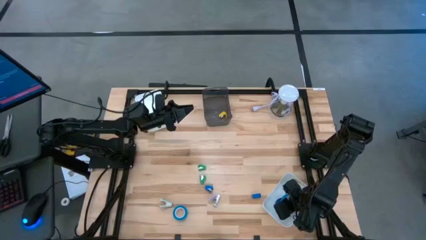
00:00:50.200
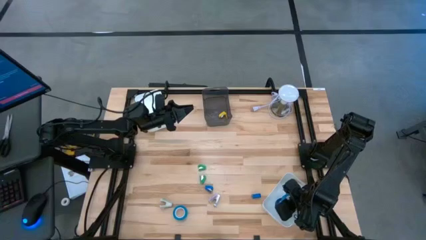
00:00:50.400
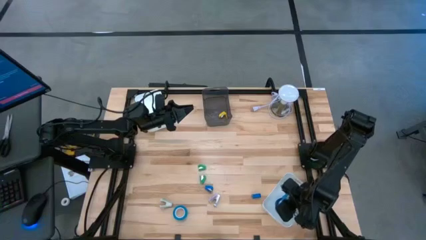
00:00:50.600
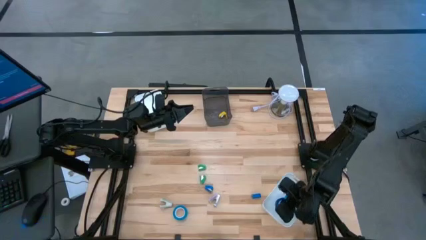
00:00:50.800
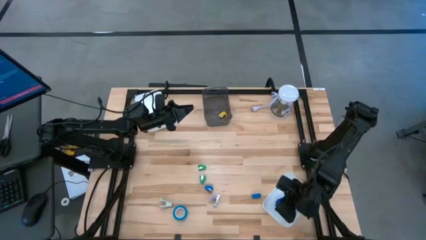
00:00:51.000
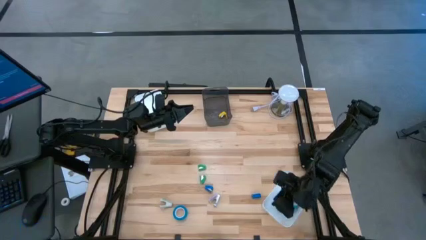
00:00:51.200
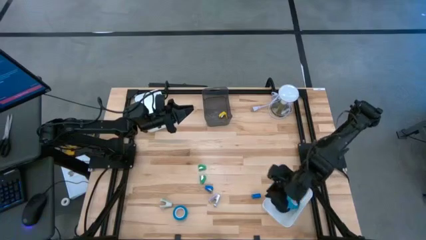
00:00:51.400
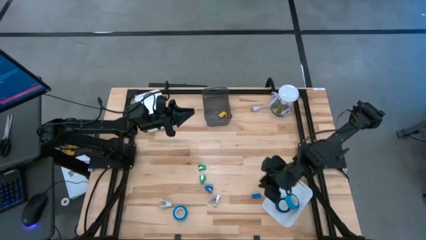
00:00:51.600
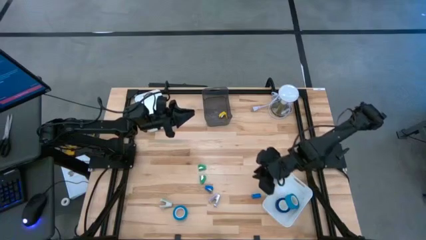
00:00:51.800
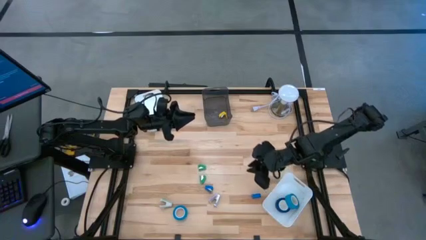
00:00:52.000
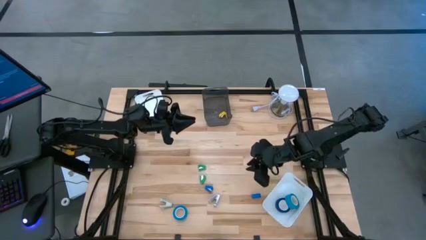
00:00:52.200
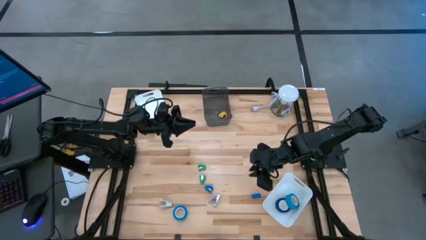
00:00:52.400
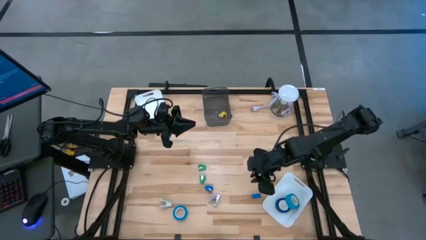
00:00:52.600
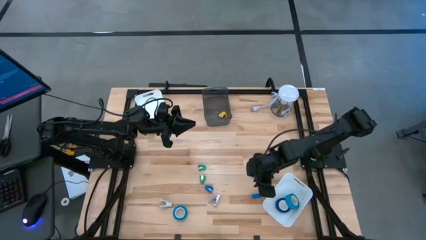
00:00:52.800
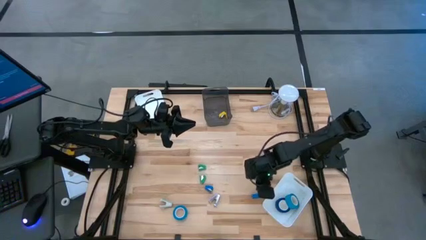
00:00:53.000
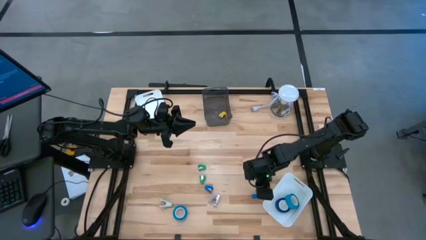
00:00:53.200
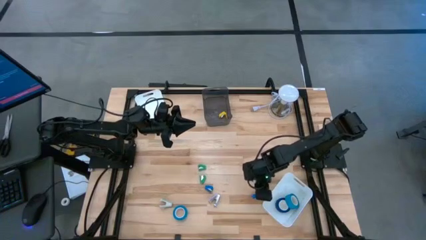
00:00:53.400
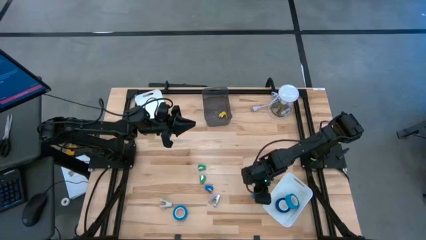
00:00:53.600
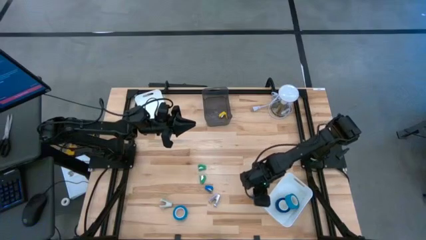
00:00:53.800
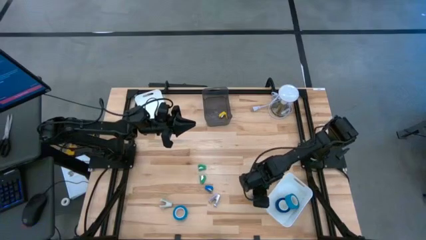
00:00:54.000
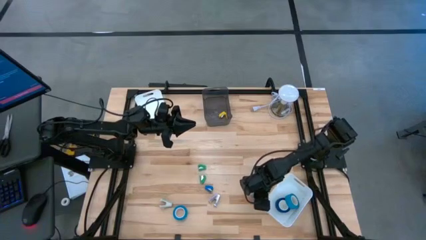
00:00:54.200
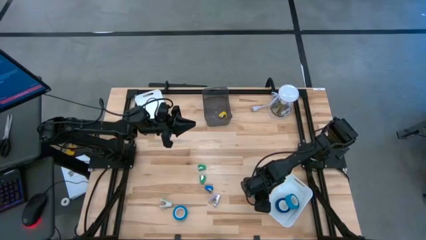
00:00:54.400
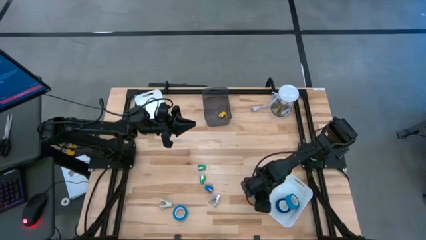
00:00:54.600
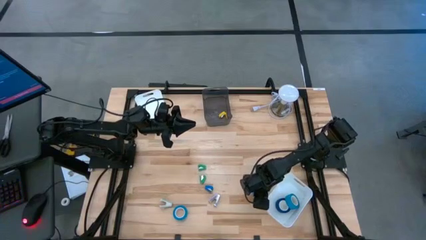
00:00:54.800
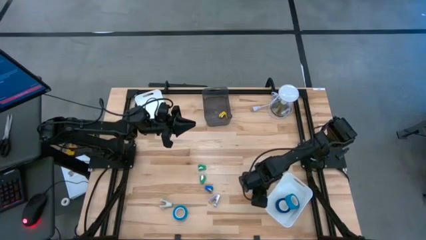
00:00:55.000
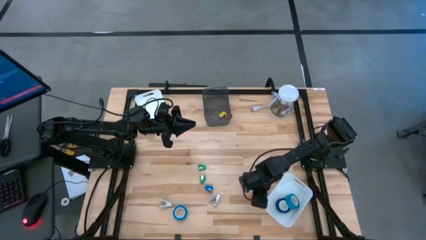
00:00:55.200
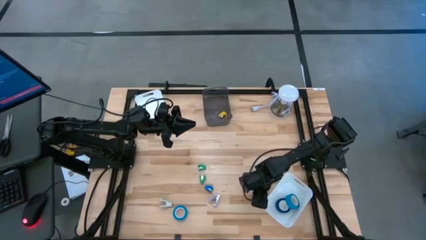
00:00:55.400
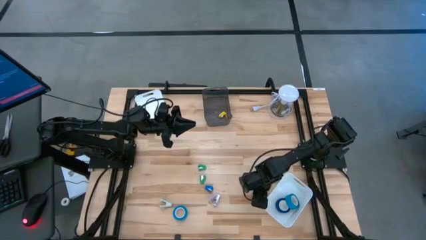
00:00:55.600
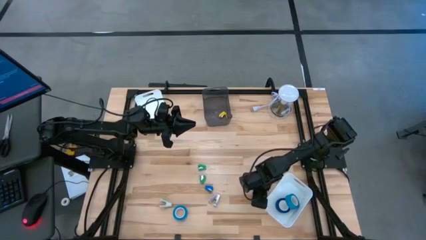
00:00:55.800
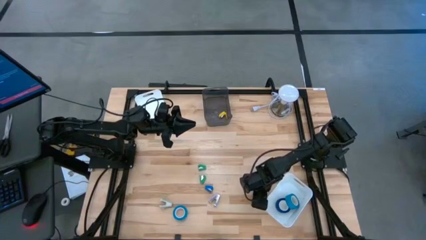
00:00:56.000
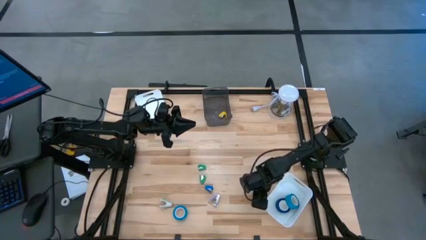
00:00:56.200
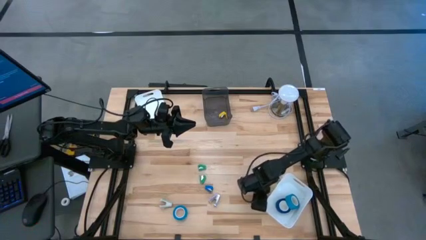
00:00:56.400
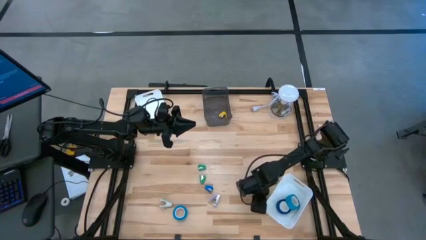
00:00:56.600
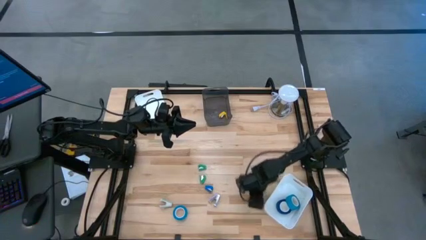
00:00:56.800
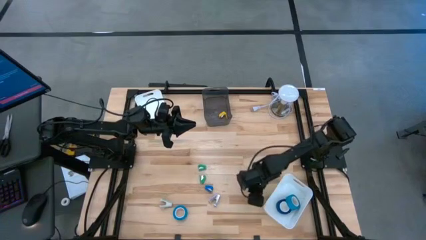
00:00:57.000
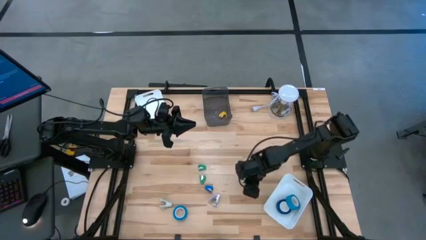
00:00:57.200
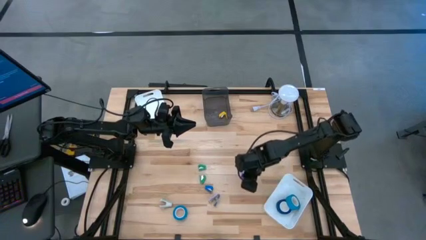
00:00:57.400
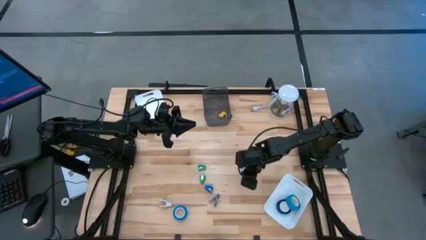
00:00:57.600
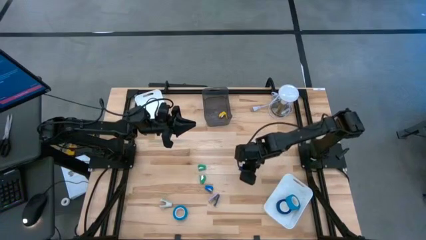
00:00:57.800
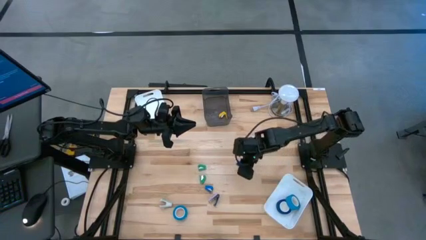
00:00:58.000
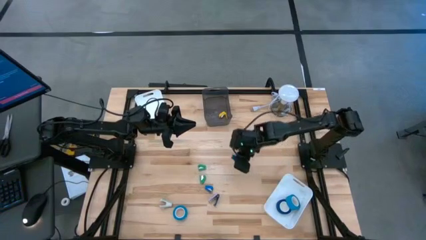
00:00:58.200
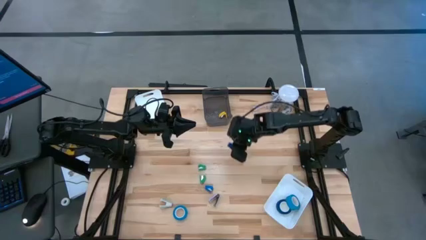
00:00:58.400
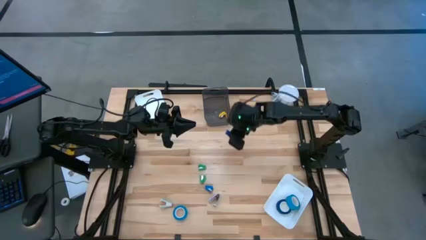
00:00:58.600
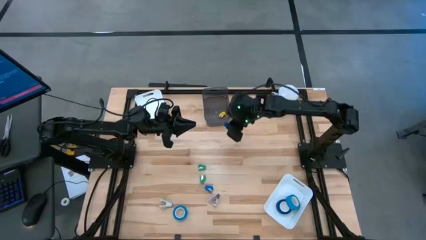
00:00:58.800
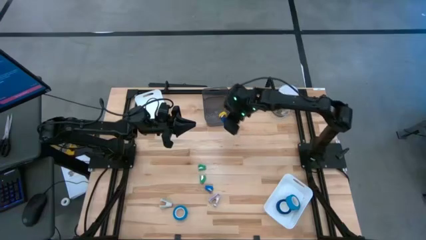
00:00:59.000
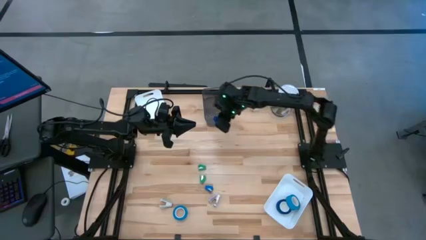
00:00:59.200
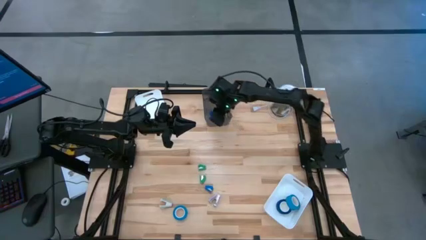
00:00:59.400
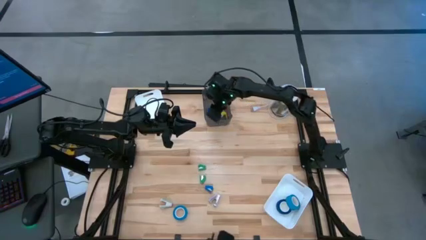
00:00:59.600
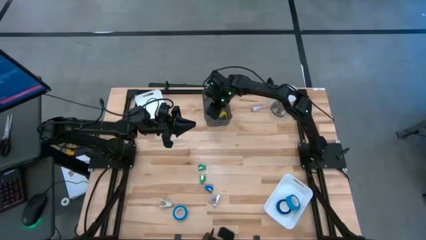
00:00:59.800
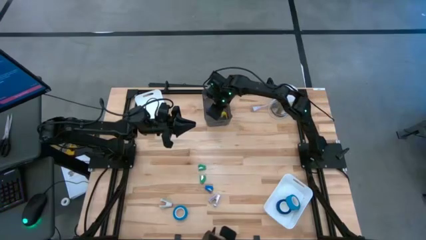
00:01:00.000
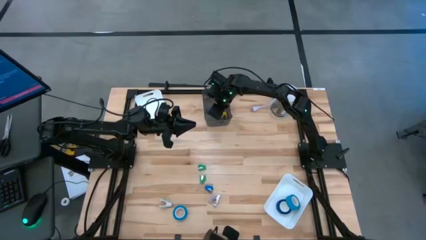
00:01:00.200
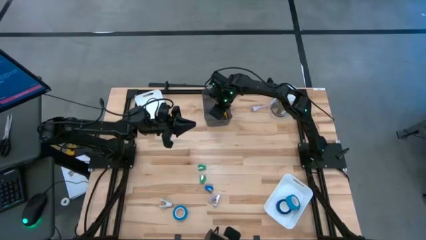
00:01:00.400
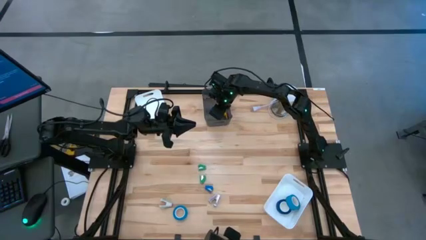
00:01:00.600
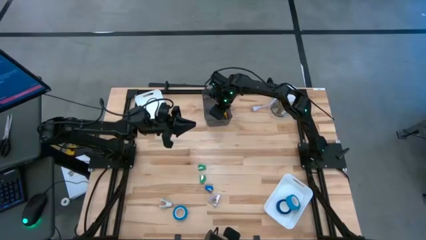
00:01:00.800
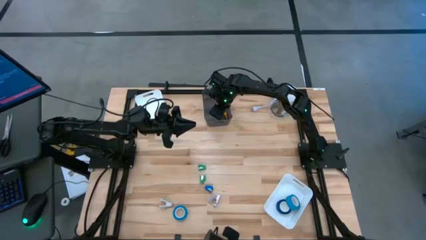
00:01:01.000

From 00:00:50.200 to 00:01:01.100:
Task: Pick and place Stapler, Stapler remover, tape
Put the right blue stapler into the black bin

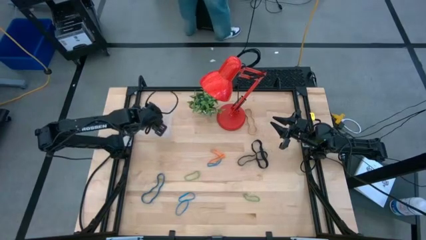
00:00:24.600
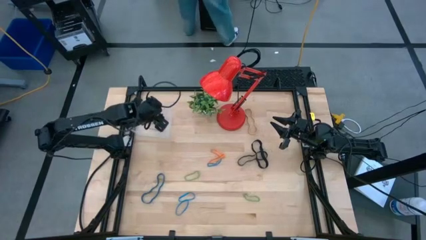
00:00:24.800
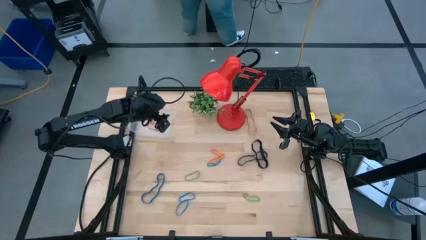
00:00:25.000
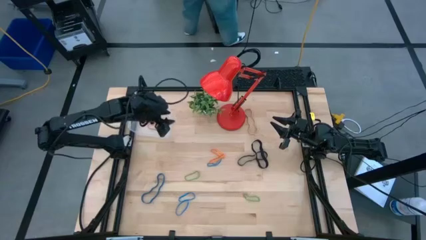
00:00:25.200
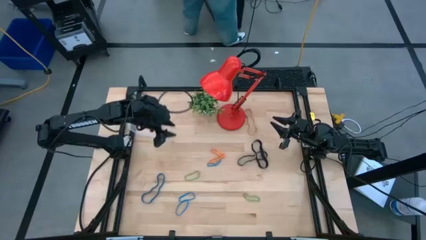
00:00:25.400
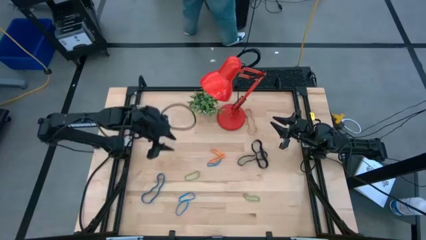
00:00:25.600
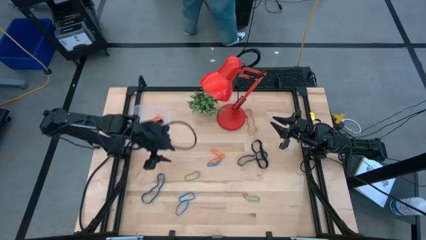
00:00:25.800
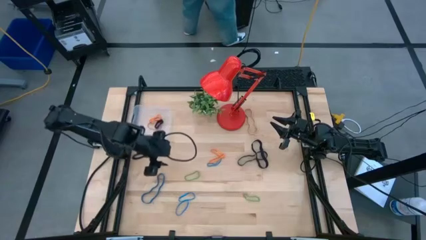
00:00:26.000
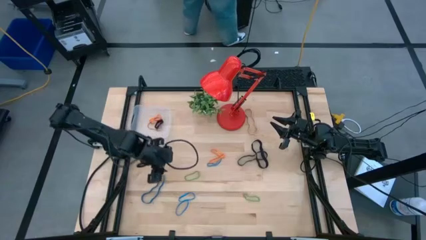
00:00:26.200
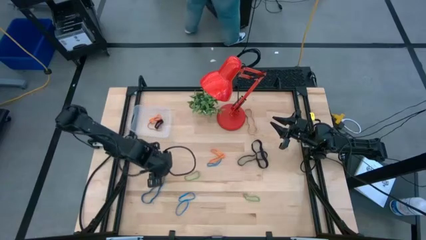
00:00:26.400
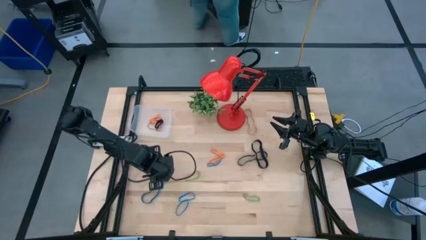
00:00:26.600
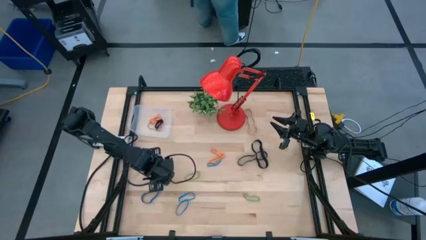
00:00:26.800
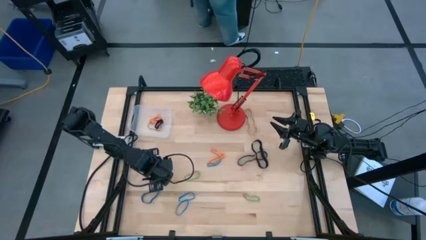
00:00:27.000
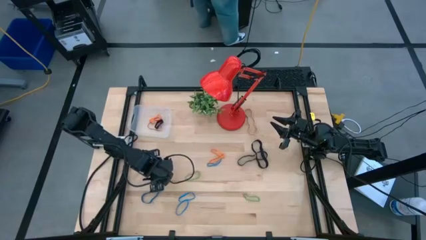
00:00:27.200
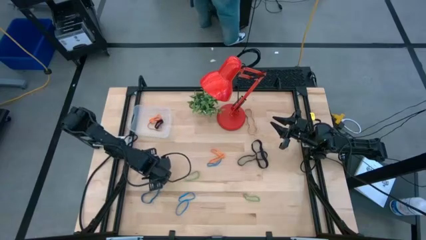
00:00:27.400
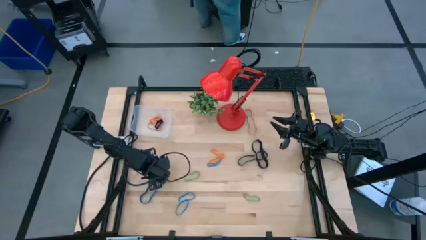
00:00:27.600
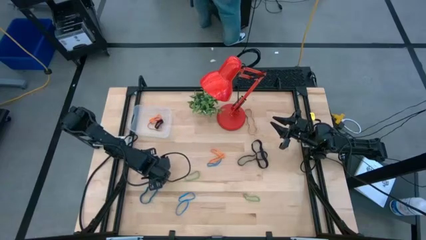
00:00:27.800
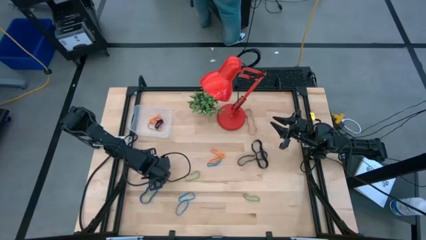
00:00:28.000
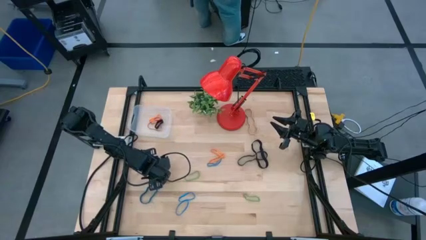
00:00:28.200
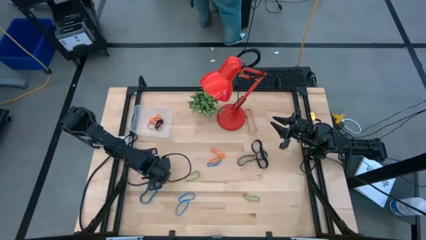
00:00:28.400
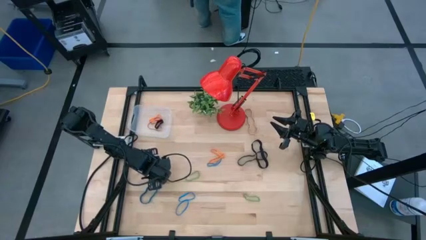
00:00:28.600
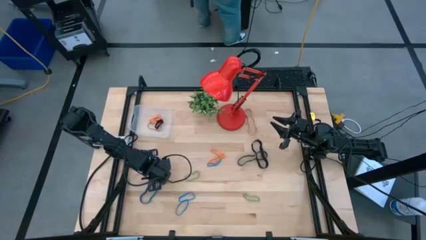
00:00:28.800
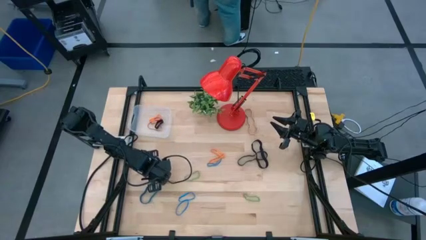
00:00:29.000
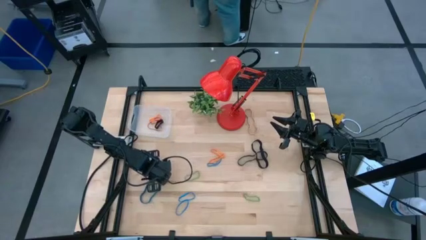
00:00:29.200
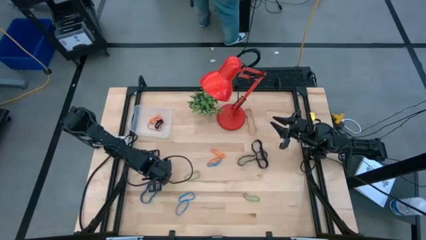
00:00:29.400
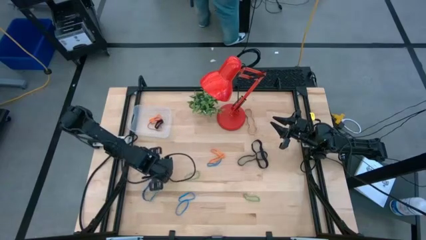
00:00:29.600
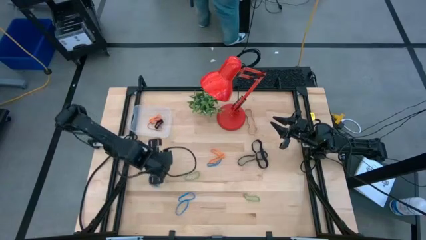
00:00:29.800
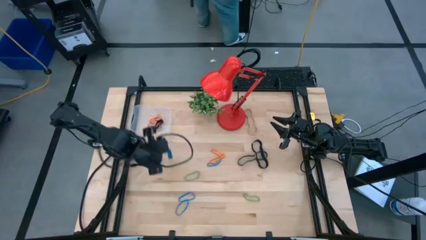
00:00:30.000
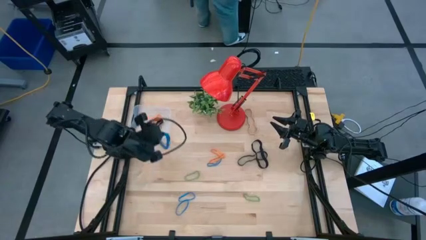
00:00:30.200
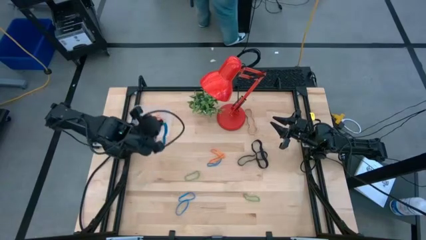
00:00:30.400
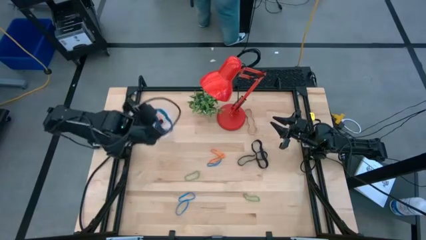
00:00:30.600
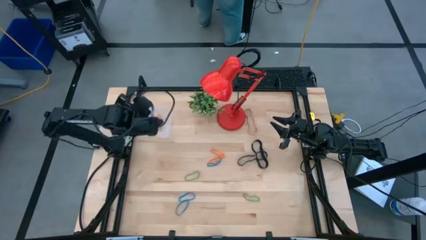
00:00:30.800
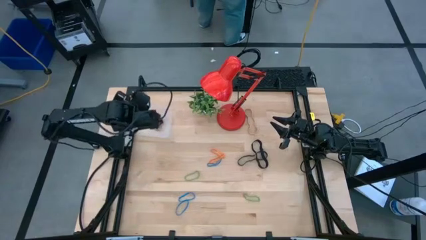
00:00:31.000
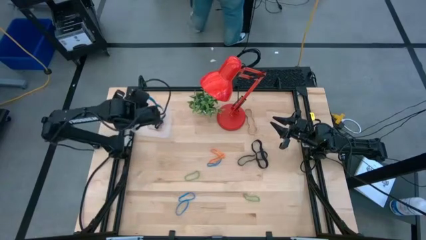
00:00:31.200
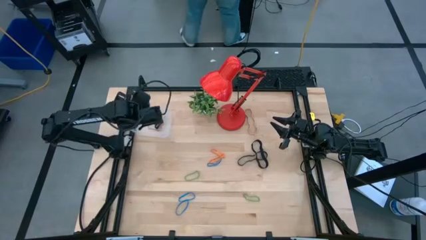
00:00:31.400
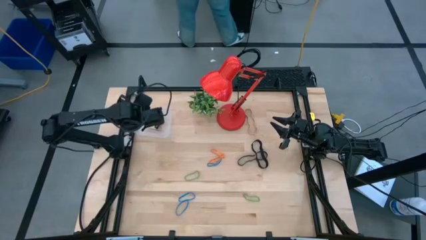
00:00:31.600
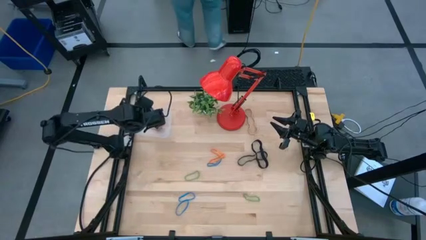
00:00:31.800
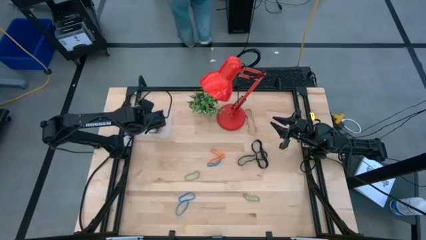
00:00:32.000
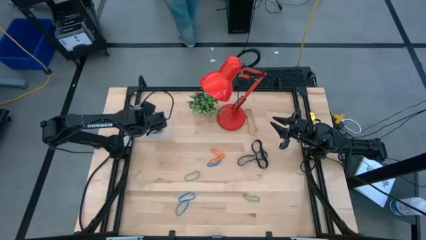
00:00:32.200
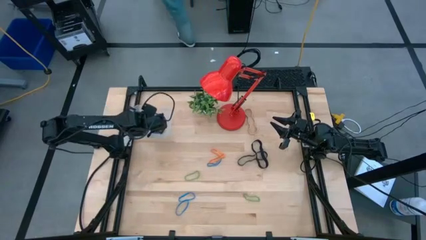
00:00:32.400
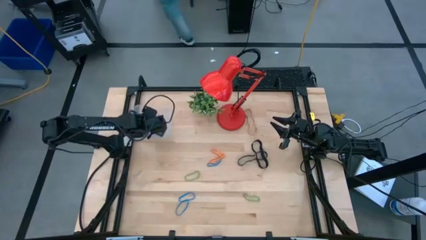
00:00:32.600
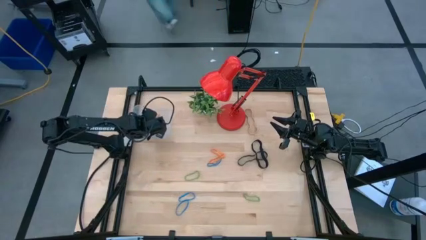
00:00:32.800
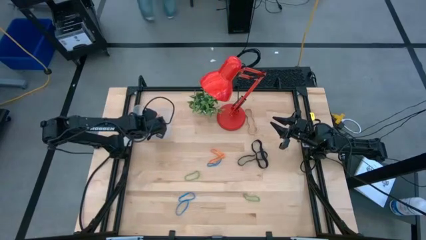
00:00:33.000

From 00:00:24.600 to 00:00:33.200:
Task: Pick and place rubber bands into bin
Put the blue rubber band into the transparent bin
